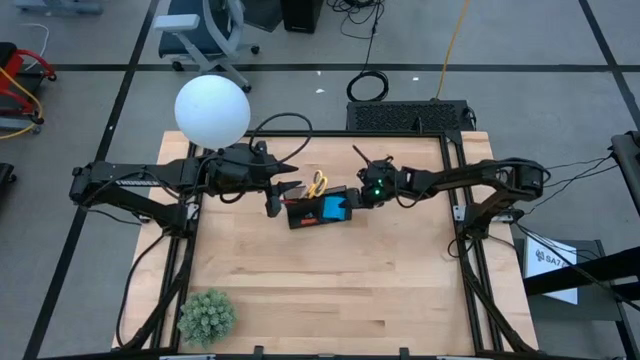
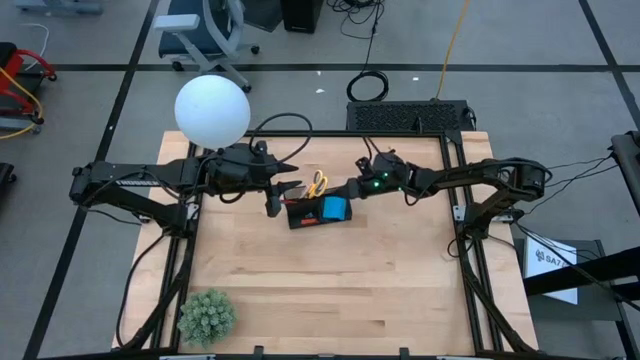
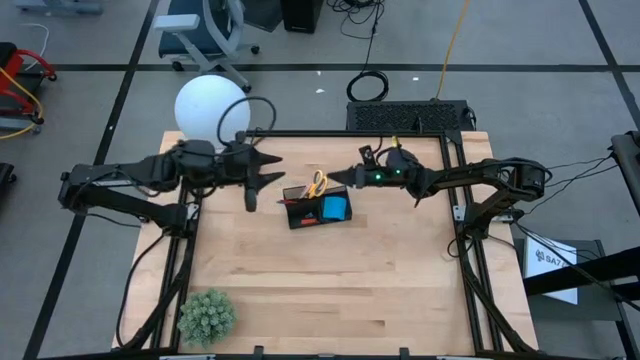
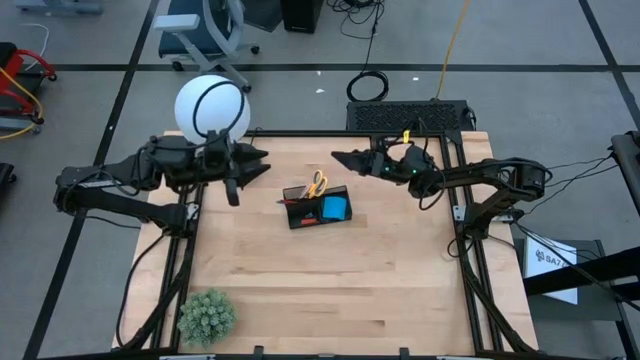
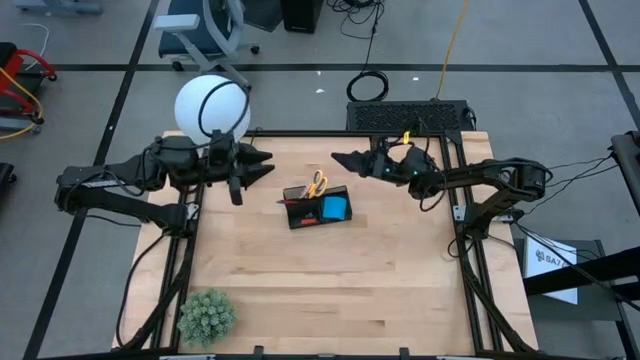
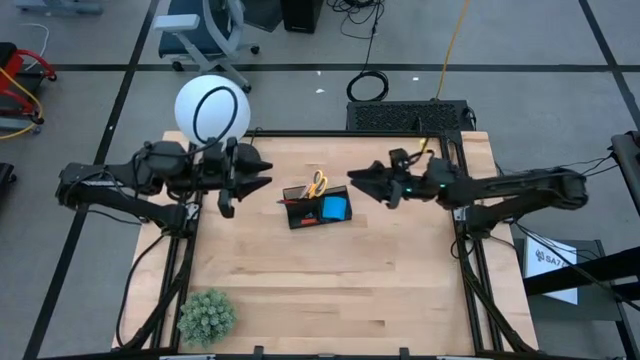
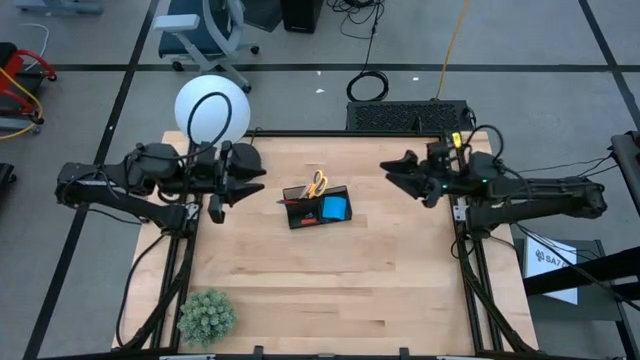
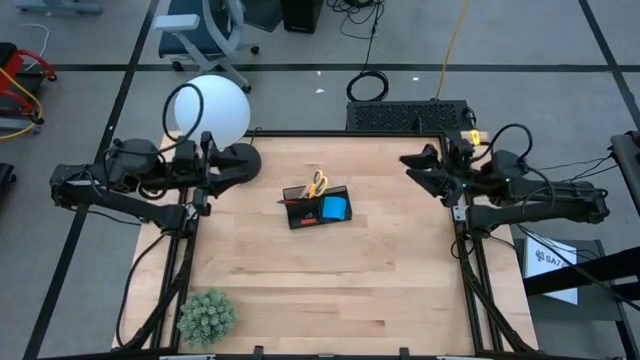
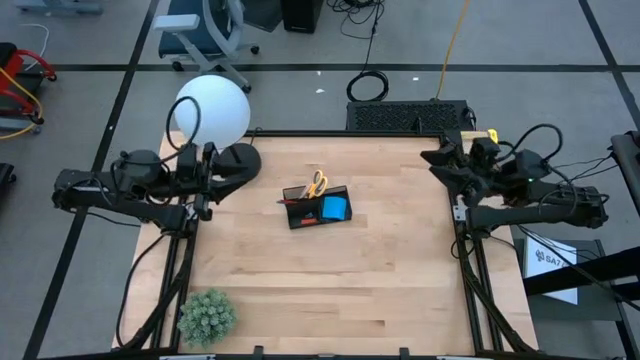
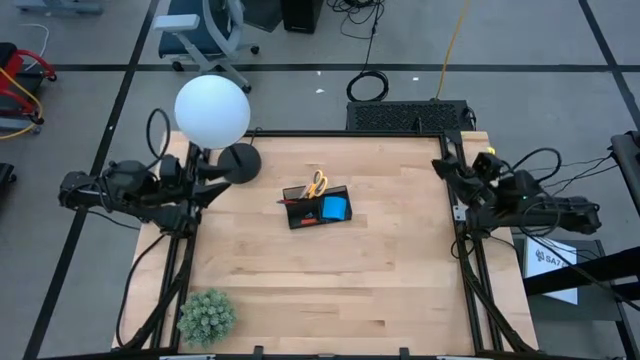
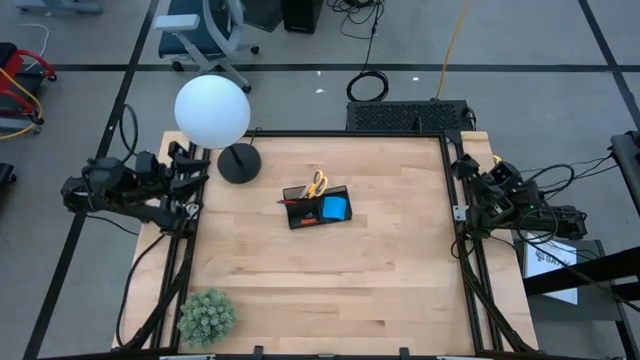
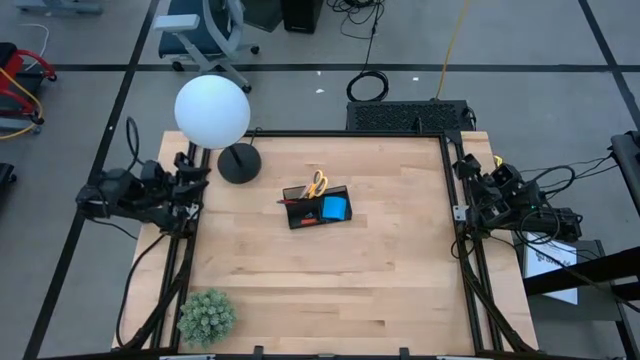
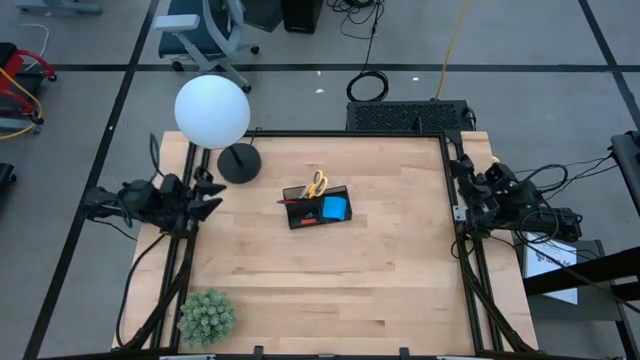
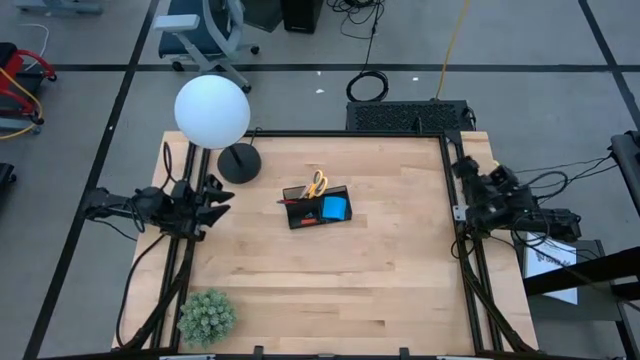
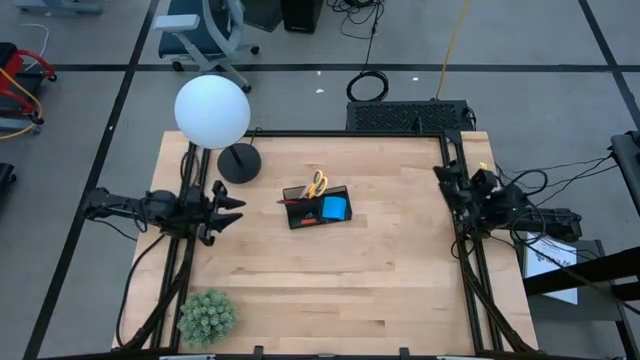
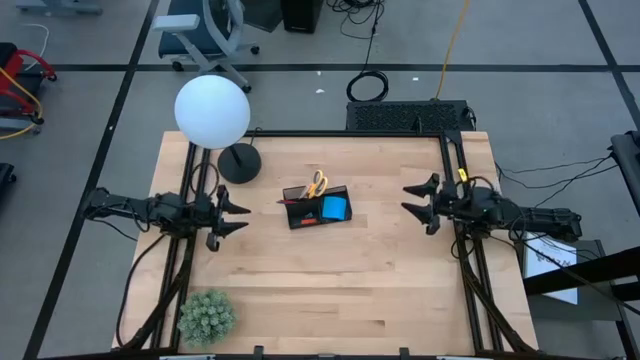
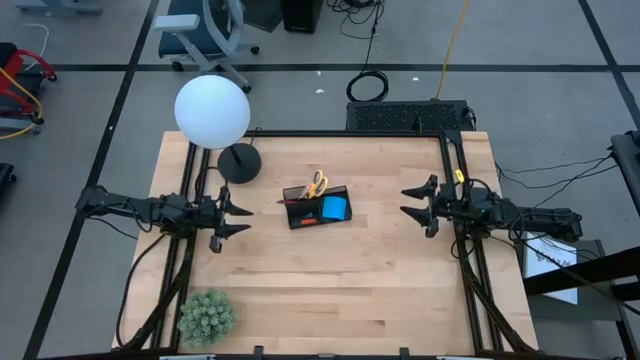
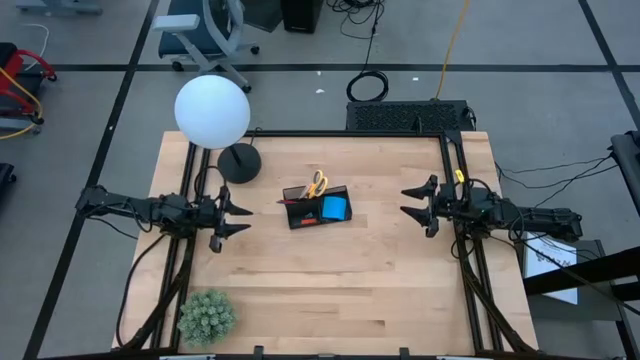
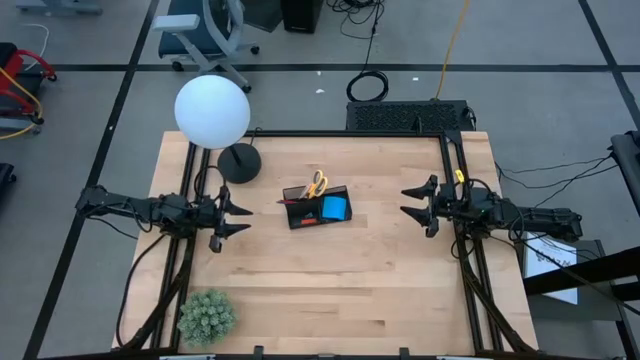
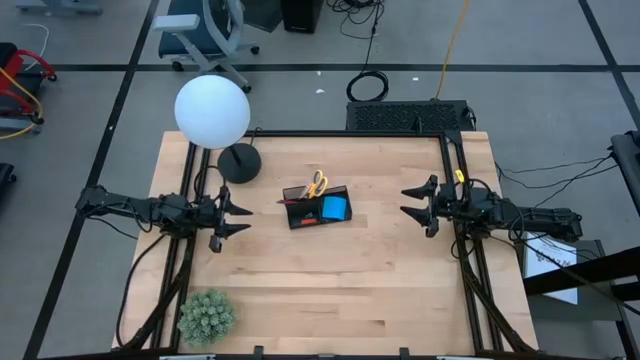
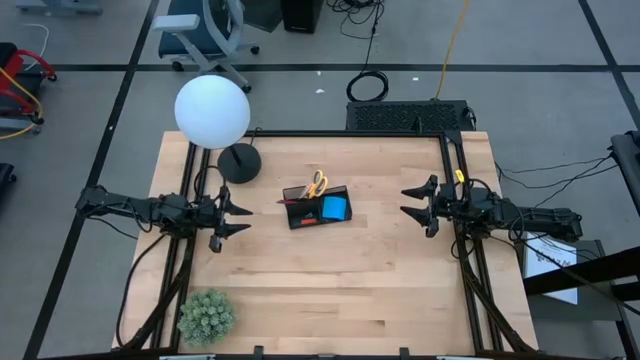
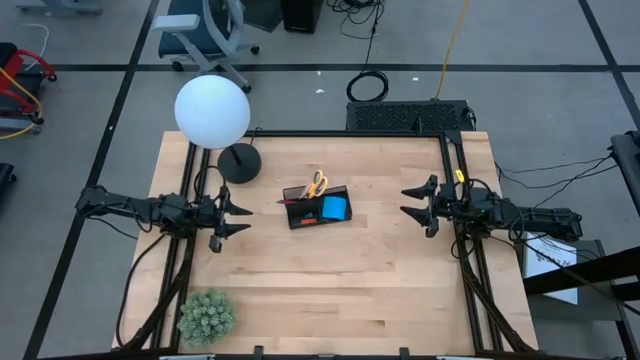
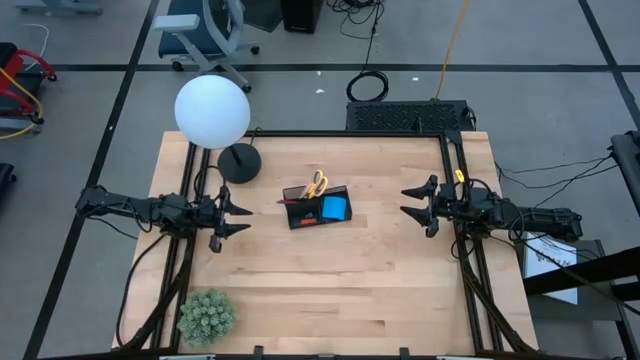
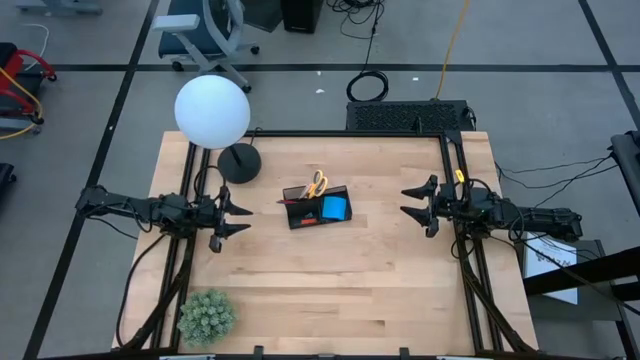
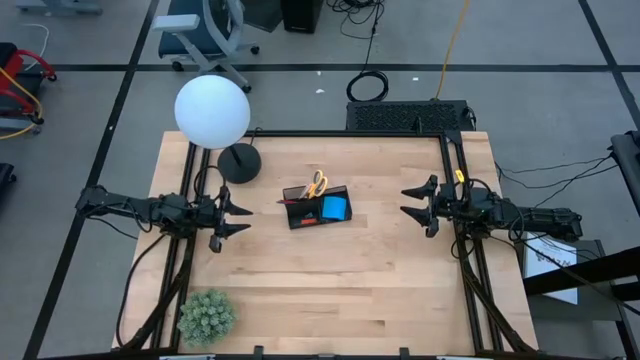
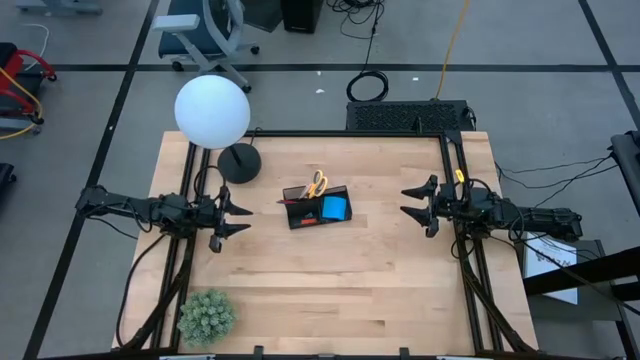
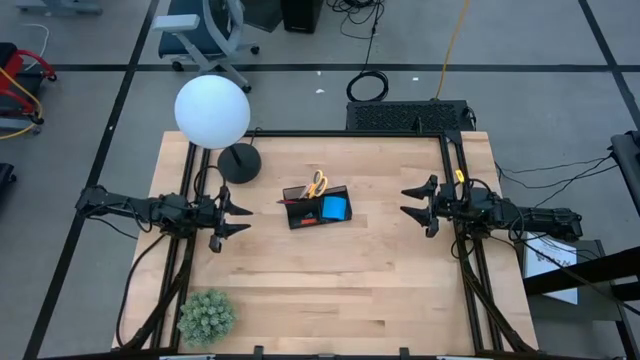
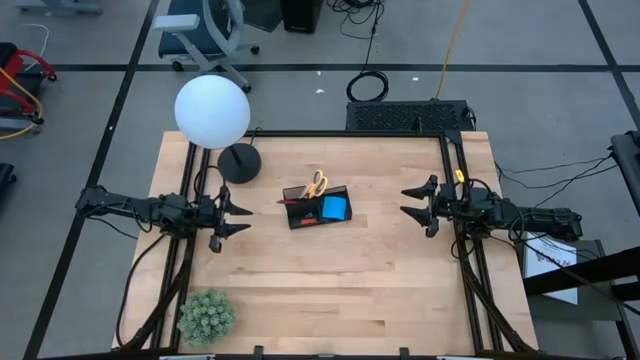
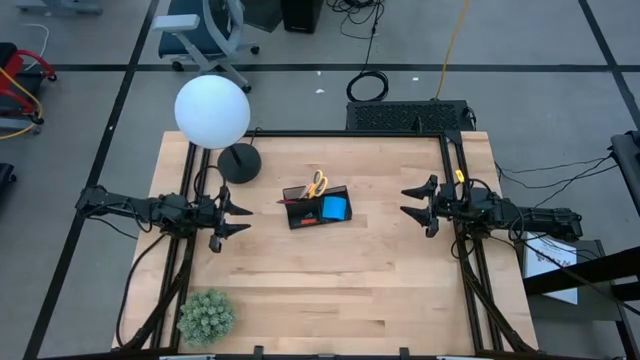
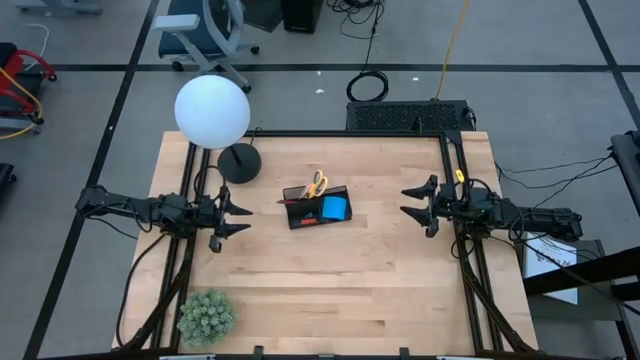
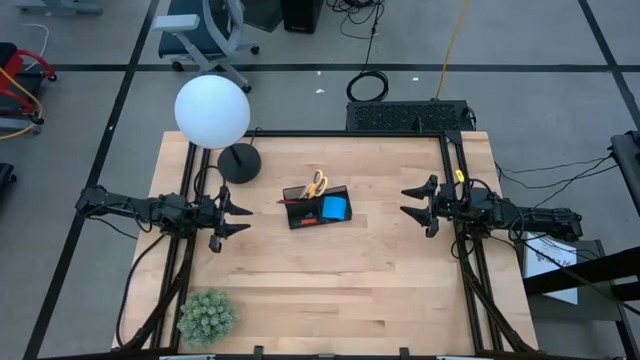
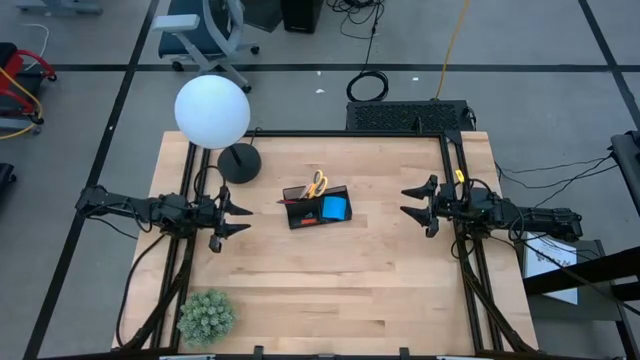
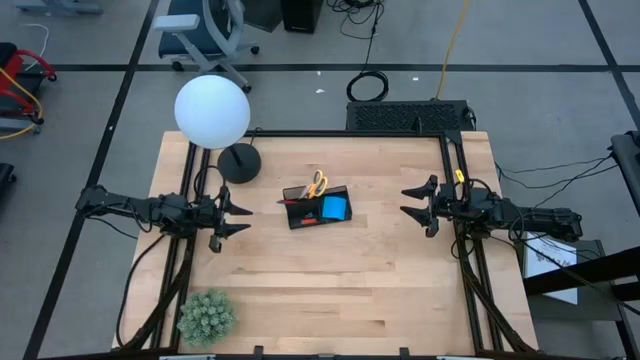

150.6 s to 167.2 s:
Task: Pick and place office supplies into organizer
Return to Home Position
